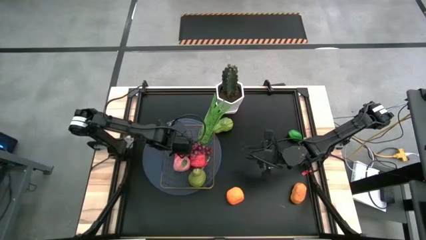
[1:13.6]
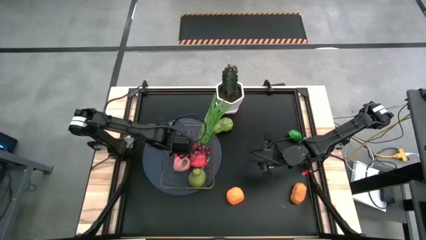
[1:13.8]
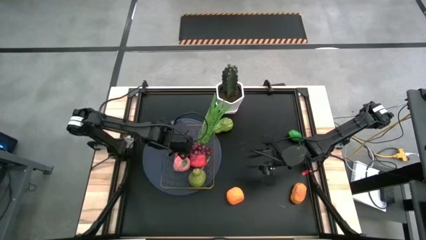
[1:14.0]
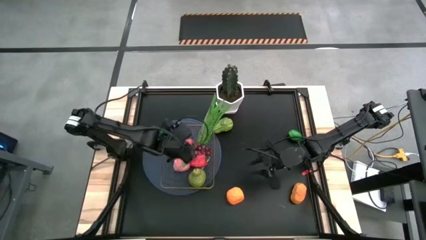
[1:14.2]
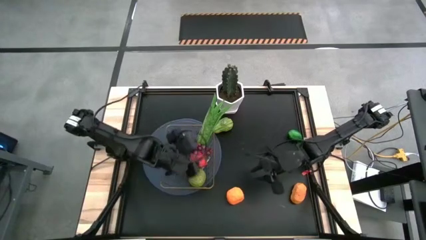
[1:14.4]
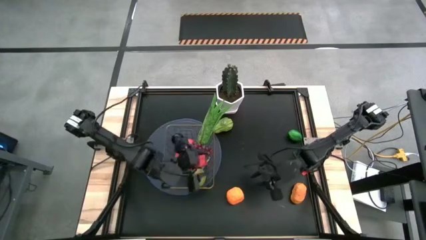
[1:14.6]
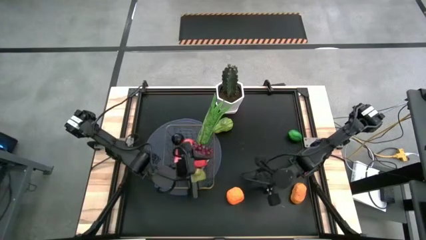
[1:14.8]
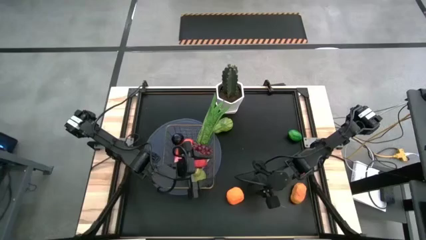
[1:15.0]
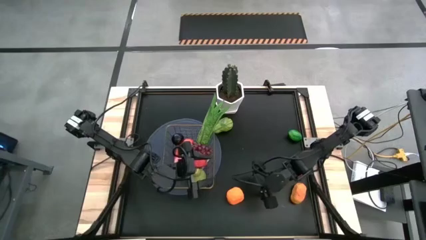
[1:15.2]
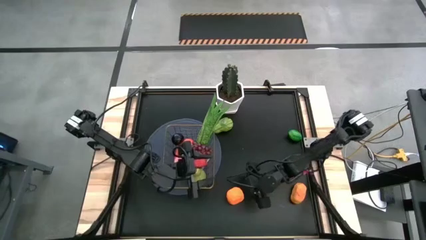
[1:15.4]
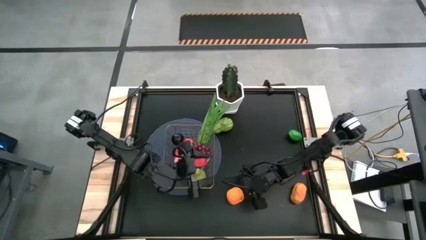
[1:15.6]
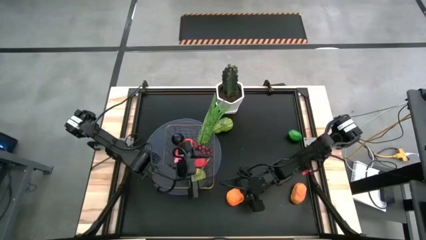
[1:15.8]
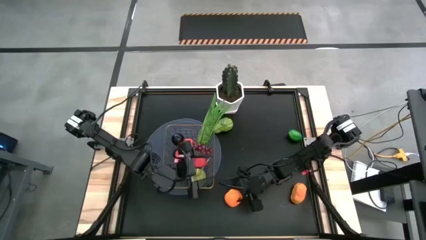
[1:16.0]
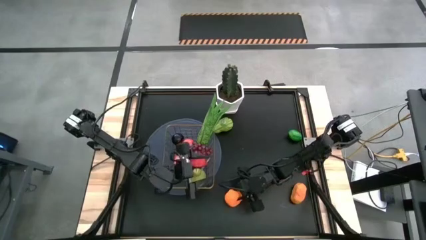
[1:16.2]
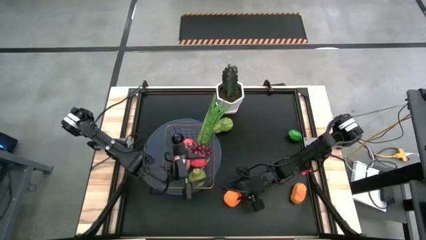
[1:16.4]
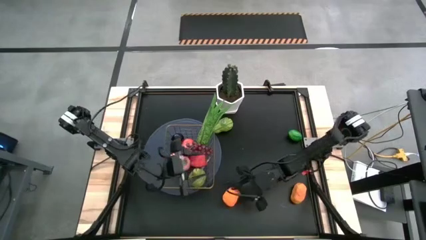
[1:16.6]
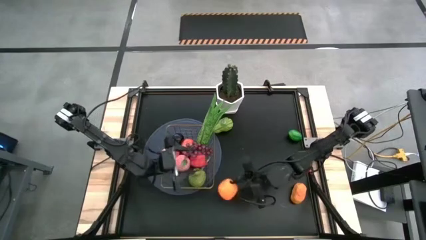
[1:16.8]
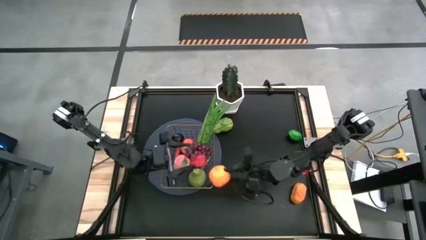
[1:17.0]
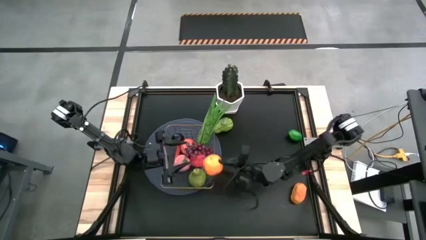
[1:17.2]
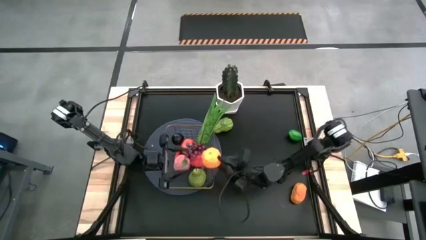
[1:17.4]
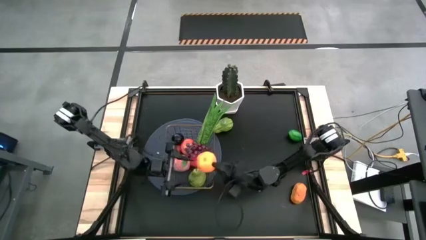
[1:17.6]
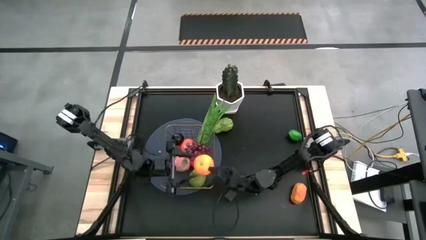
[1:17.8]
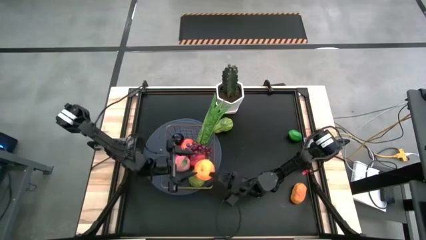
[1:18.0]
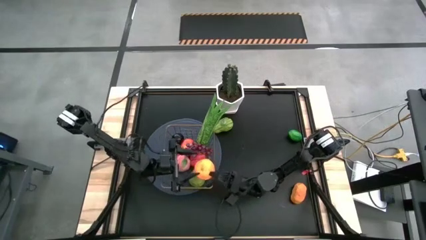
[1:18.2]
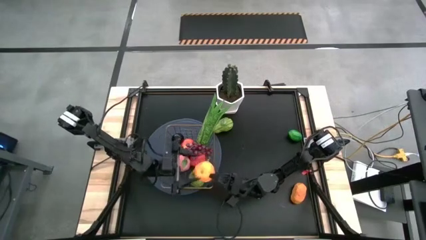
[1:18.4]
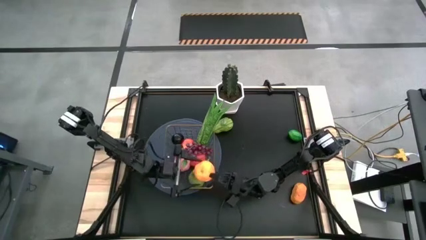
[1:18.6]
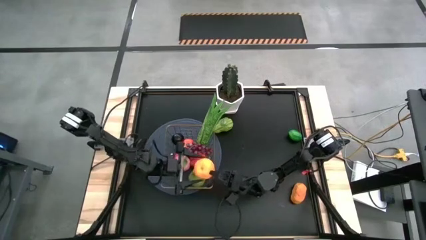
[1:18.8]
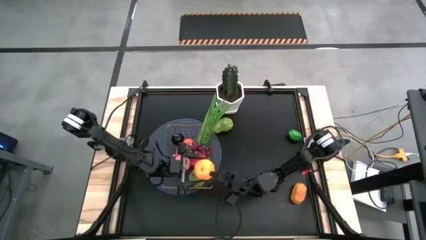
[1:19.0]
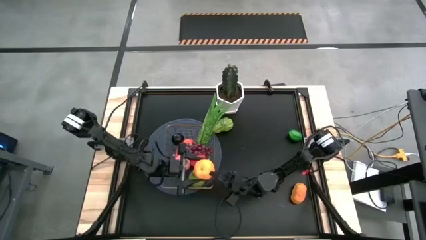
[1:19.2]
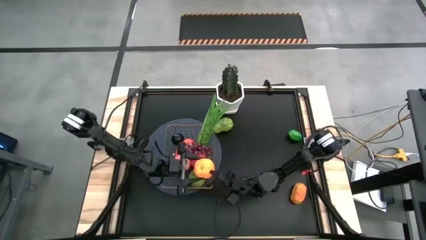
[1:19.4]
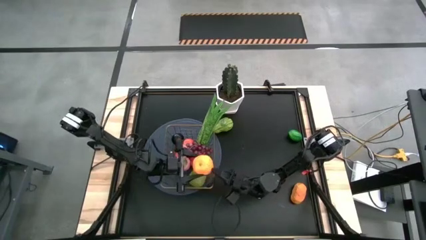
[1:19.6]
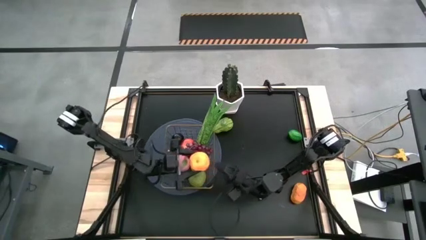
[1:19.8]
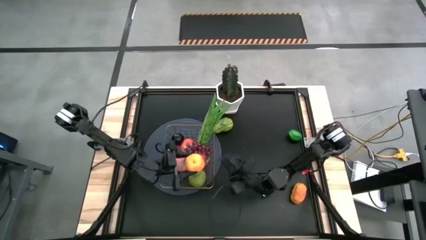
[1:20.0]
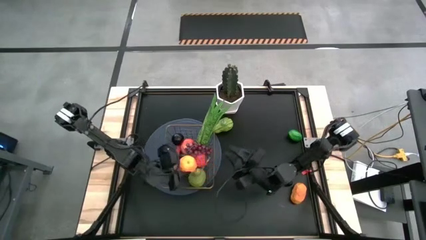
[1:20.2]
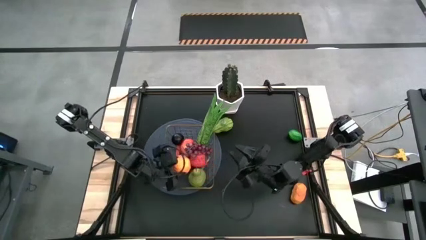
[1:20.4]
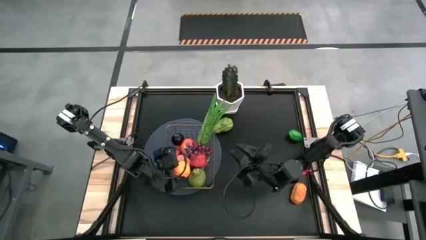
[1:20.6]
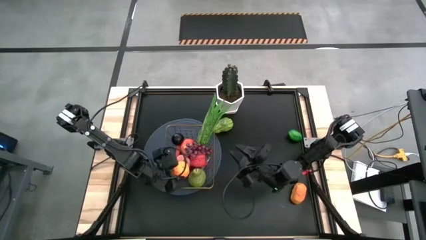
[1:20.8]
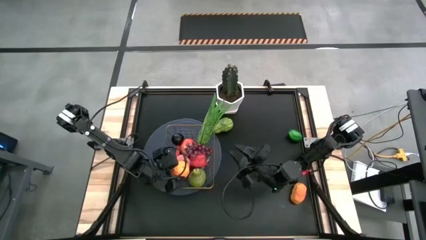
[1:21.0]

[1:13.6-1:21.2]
Task: Build produce basket
Put the orange into the wire basket

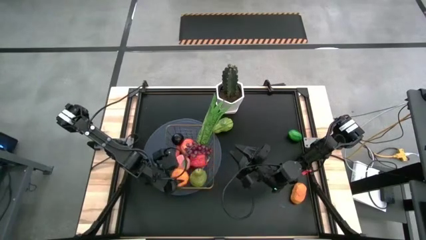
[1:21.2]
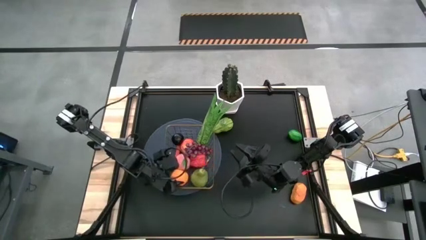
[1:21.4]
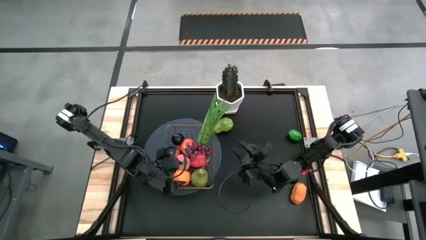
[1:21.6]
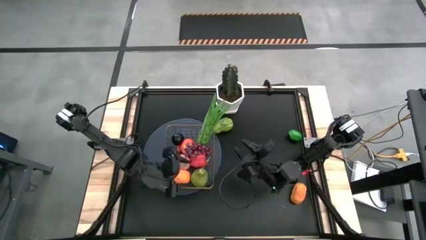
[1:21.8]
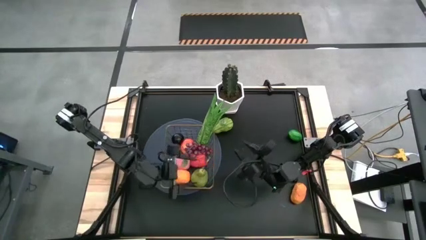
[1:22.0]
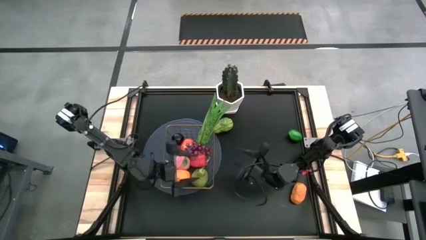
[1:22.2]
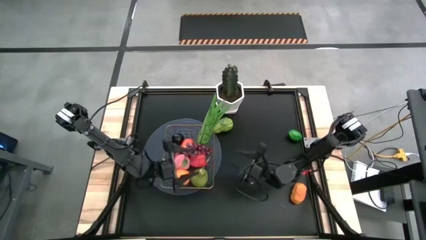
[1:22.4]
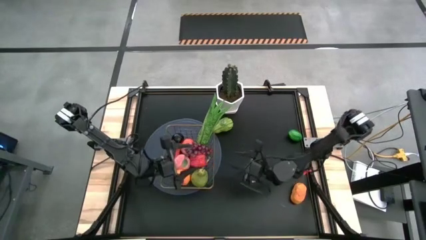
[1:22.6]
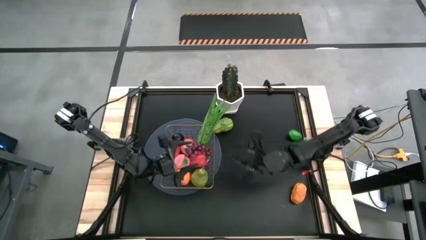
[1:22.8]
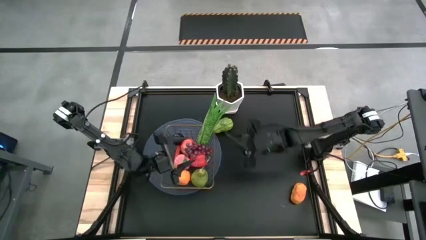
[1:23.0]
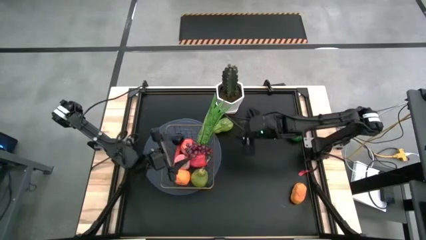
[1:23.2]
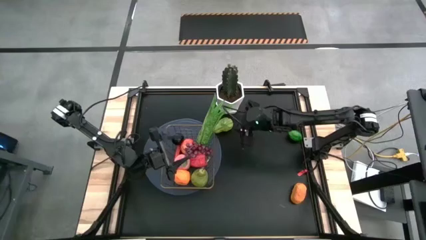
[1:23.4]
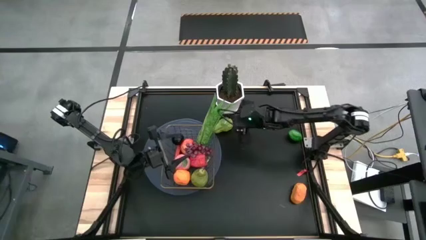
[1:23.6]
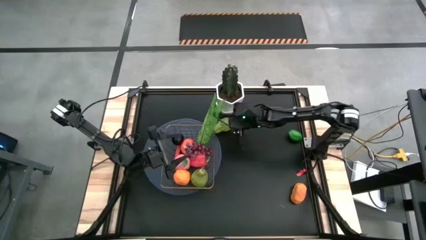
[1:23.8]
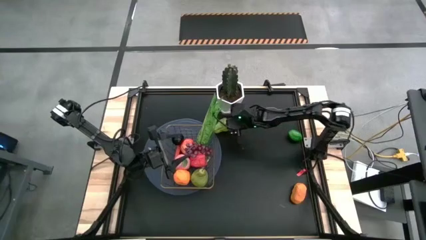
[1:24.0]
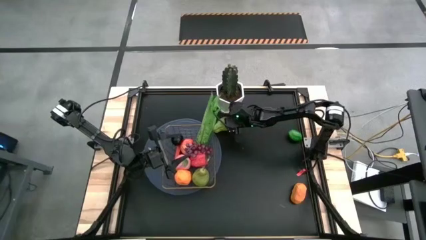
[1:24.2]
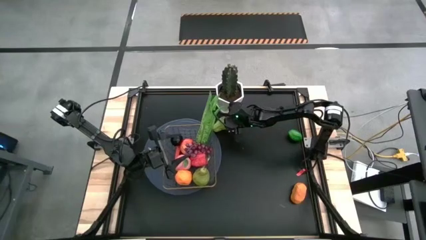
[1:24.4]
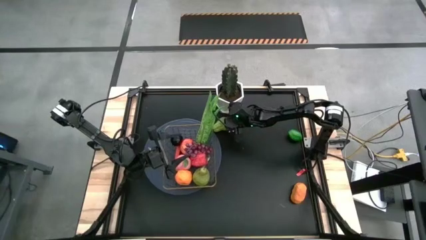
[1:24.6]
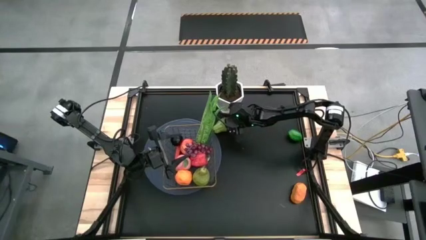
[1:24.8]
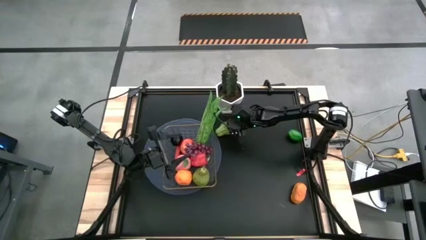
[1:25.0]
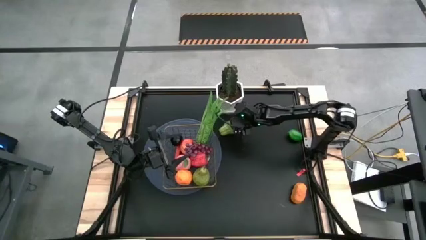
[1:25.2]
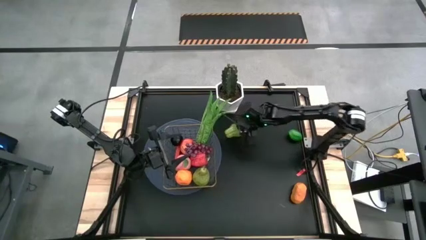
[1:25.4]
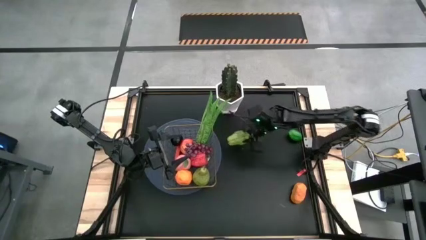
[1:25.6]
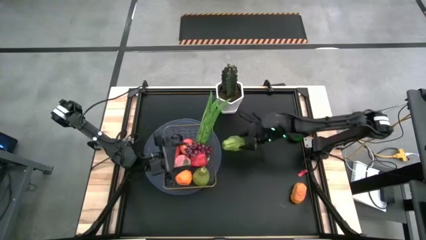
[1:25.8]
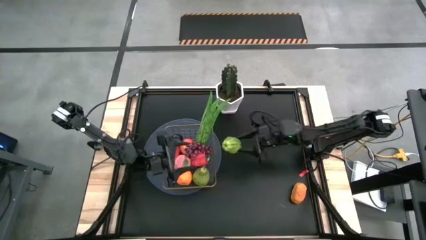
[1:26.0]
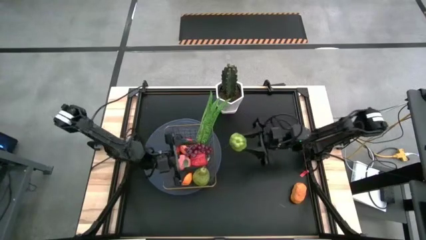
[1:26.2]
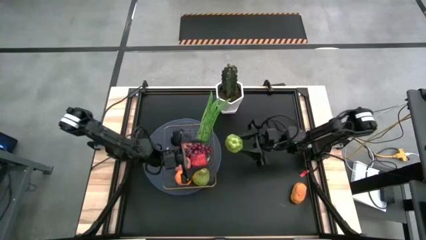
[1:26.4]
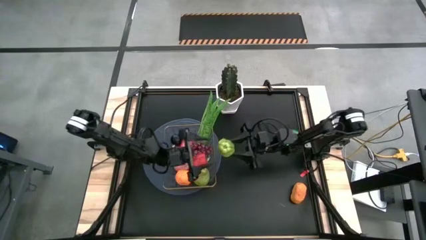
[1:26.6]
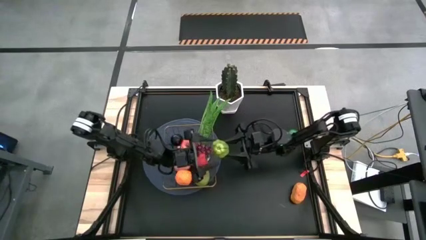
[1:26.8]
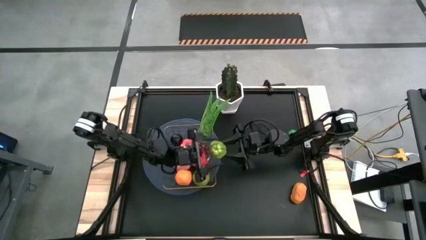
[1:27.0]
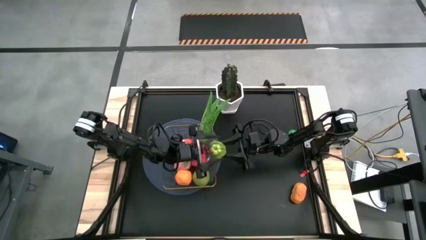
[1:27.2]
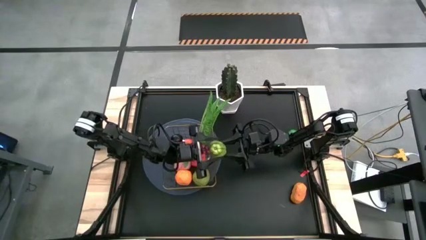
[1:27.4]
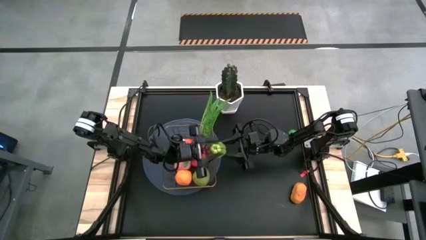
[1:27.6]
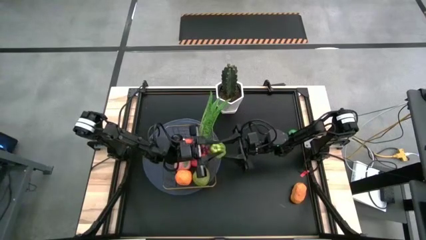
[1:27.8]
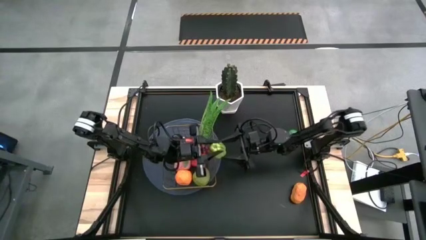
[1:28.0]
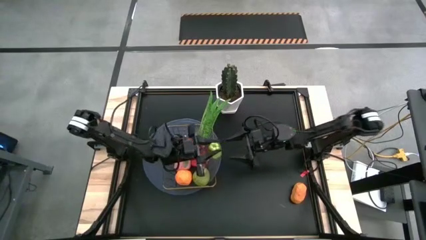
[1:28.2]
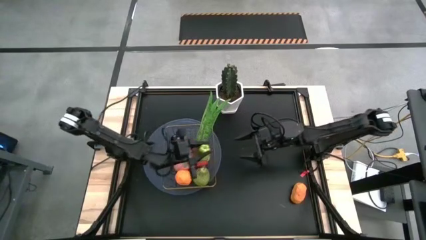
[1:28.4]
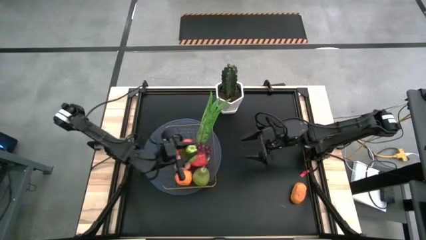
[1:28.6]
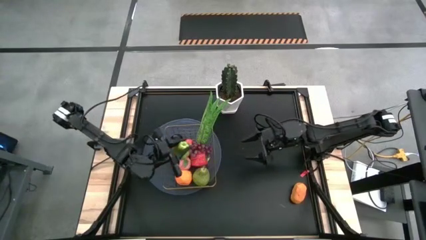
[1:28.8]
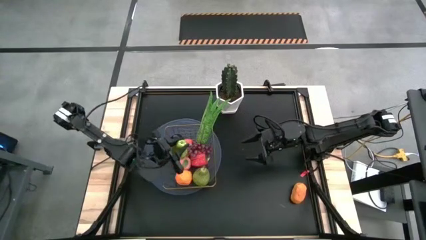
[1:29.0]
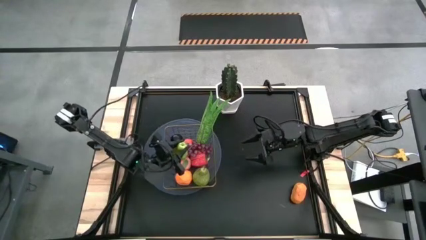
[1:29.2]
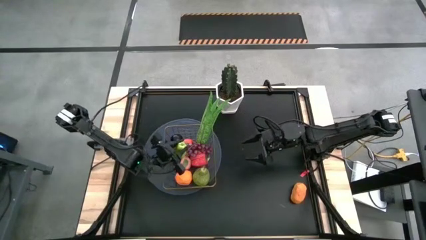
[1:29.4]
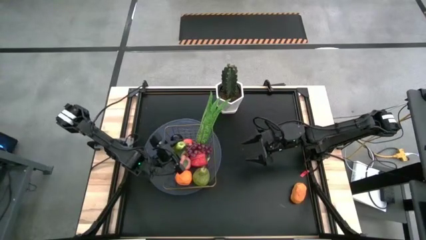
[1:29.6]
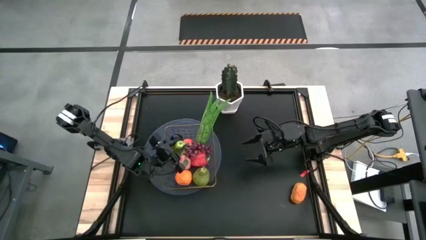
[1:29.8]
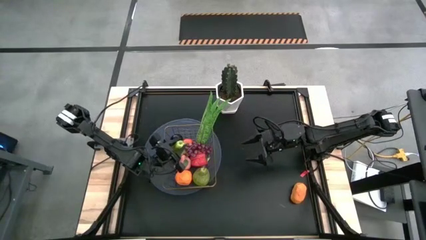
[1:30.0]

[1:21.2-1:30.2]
Put the green chayote into the wire basket
